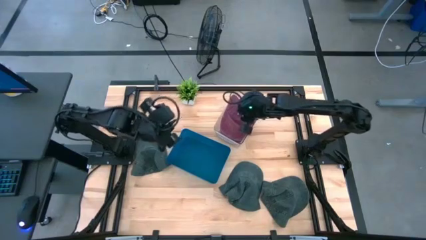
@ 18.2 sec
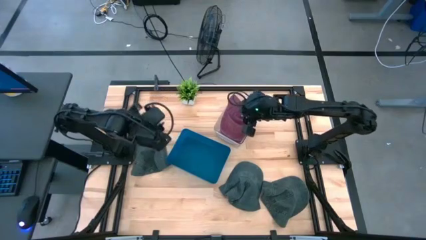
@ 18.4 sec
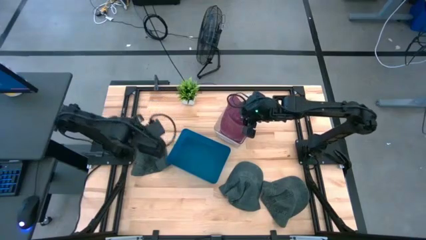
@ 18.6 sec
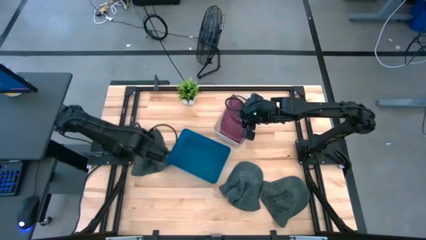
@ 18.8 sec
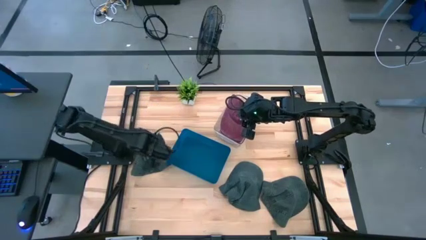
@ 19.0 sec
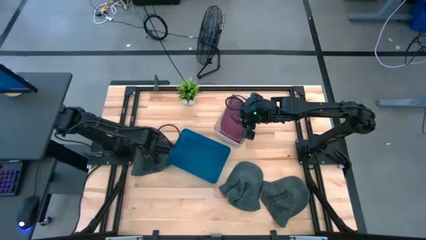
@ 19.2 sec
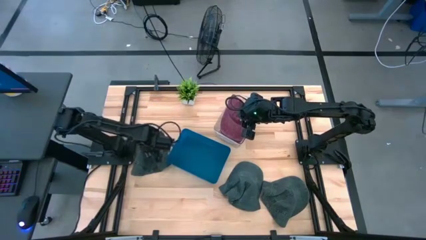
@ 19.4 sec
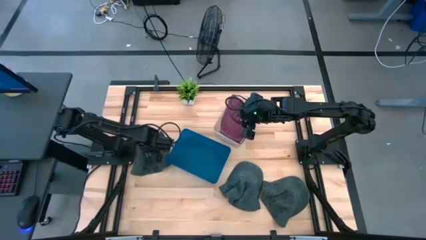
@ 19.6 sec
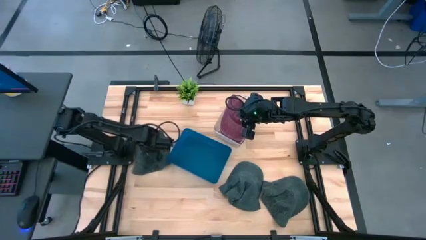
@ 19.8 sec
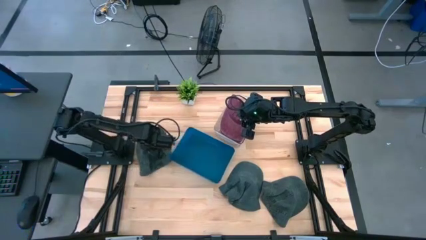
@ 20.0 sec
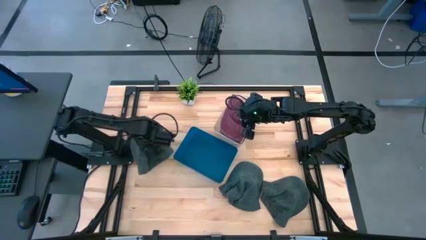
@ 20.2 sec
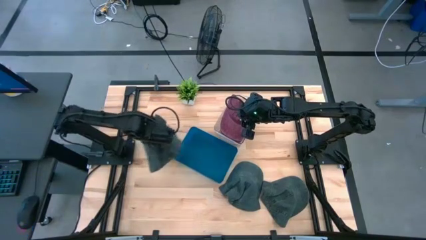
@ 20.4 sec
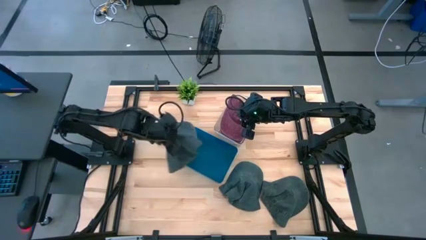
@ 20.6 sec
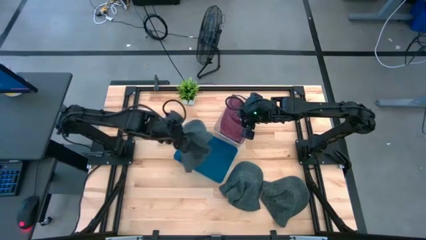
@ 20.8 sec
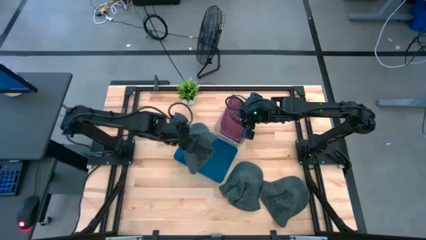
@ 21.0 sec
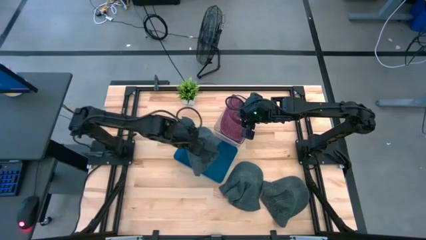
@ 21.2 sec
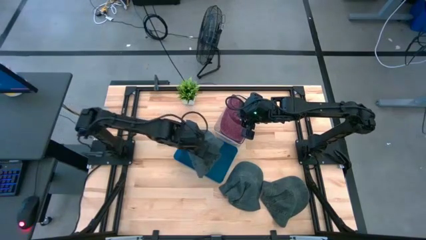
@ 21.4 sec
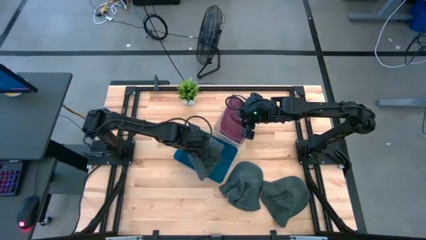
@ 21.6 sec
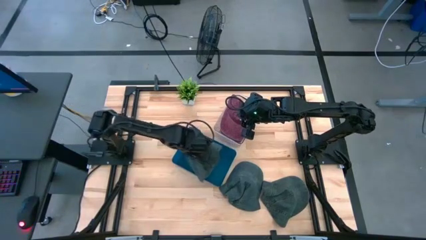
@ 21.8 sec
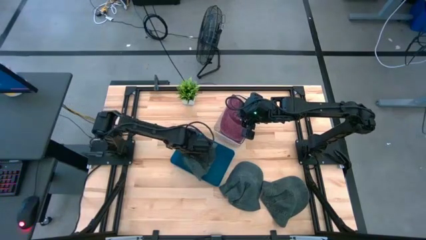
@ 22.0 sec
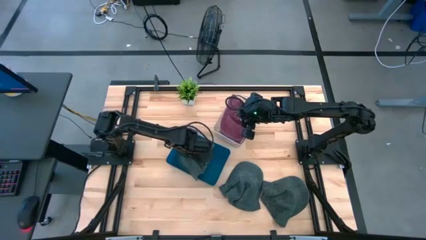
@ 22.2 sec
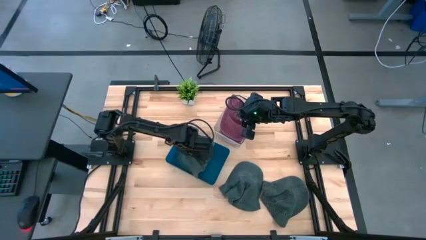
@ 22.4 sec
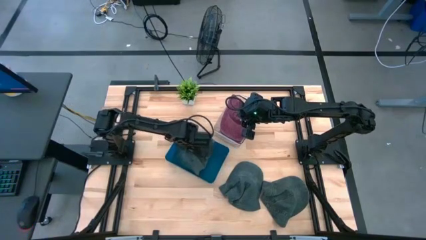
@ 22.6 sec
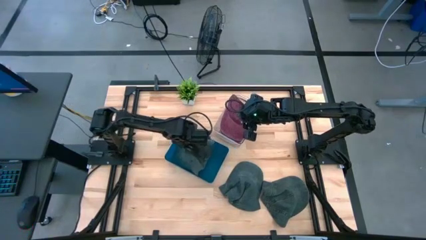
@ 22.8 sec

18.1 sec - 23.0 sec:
Task: Pick & Place hat
Put the left gray cap into the blue bin

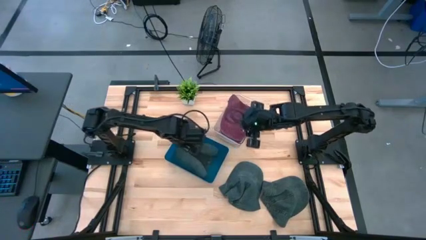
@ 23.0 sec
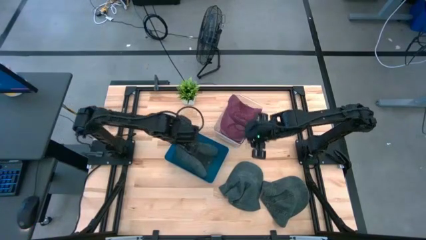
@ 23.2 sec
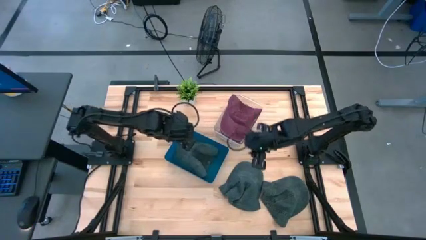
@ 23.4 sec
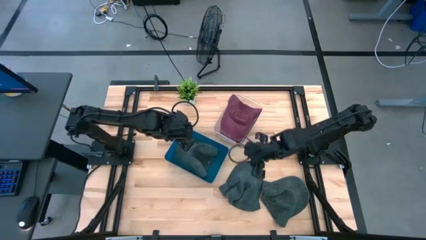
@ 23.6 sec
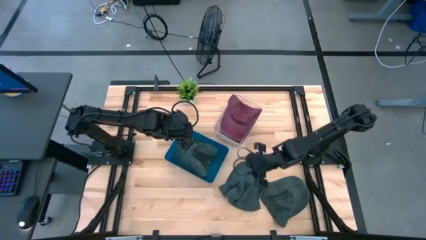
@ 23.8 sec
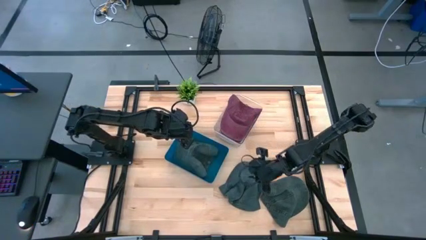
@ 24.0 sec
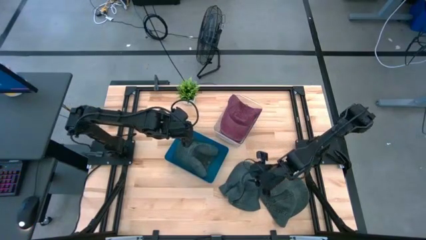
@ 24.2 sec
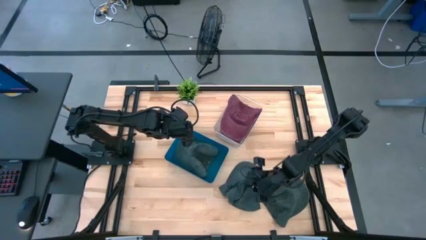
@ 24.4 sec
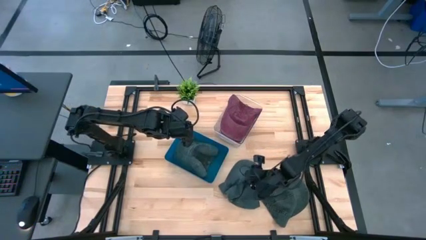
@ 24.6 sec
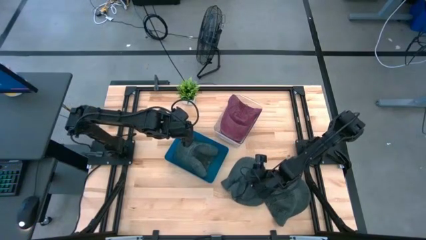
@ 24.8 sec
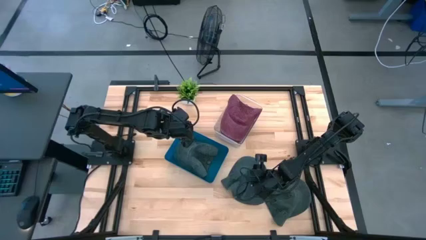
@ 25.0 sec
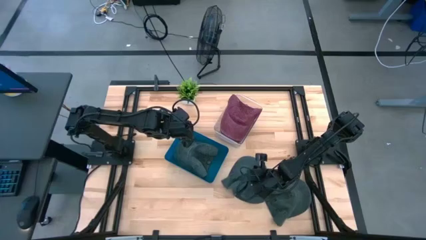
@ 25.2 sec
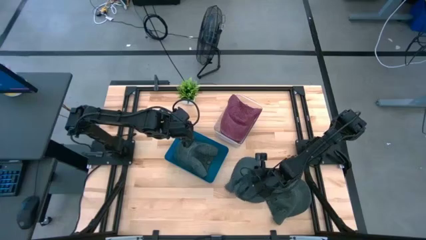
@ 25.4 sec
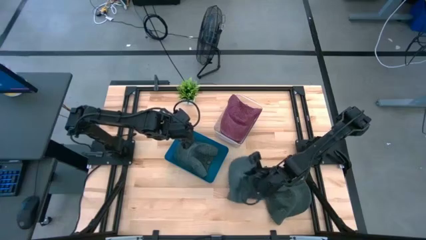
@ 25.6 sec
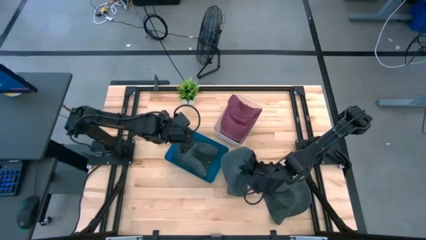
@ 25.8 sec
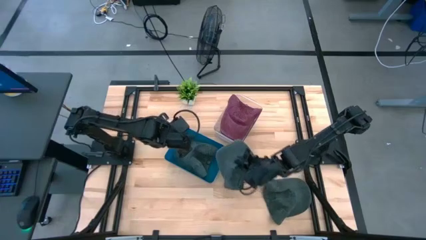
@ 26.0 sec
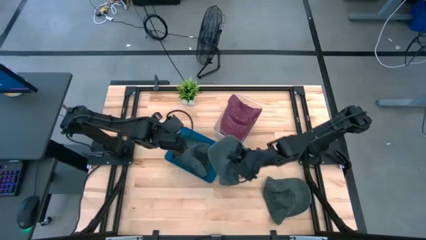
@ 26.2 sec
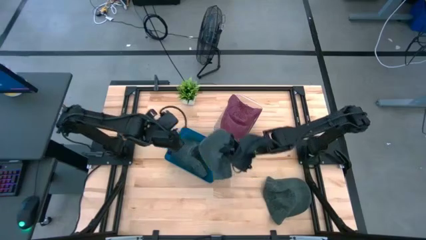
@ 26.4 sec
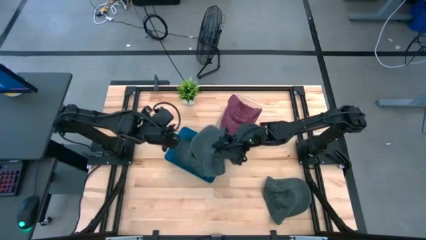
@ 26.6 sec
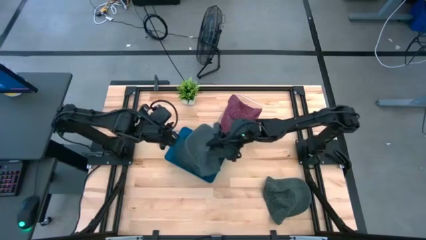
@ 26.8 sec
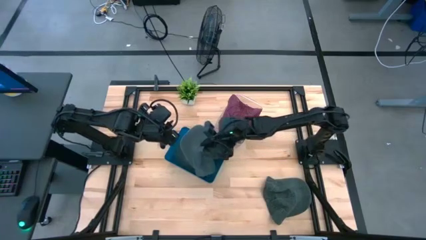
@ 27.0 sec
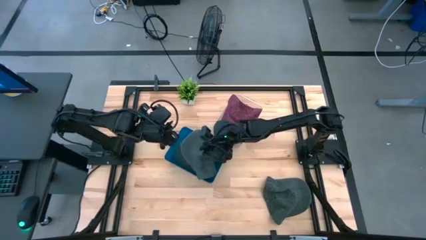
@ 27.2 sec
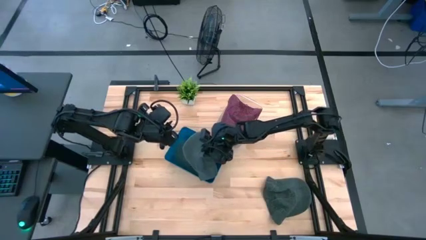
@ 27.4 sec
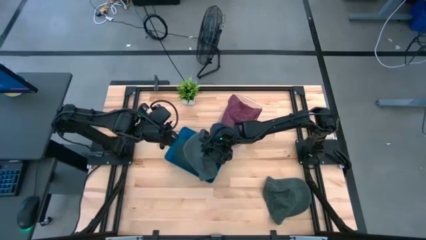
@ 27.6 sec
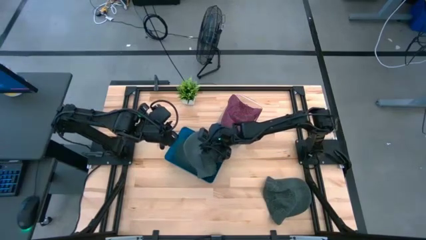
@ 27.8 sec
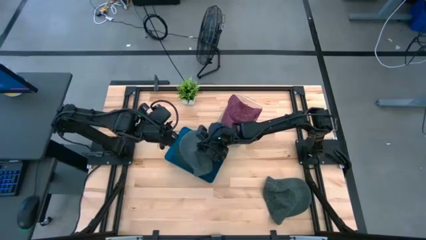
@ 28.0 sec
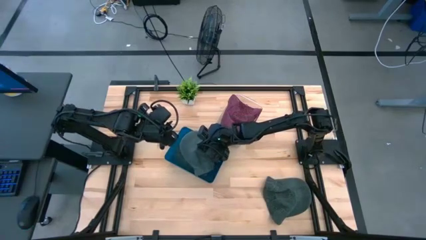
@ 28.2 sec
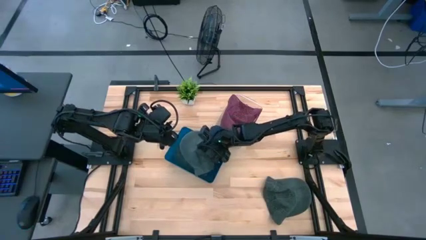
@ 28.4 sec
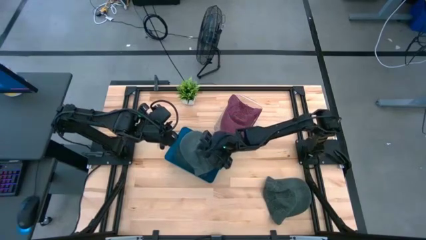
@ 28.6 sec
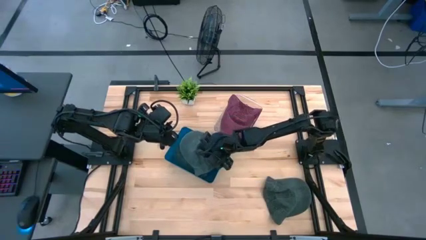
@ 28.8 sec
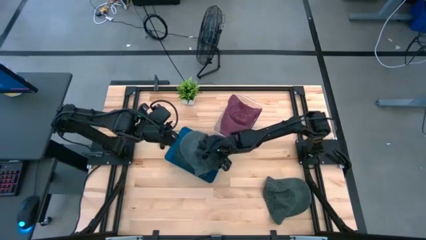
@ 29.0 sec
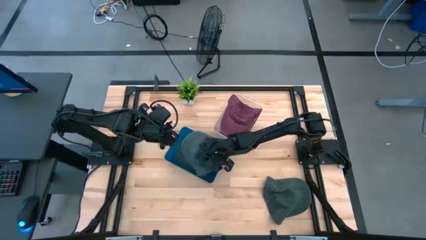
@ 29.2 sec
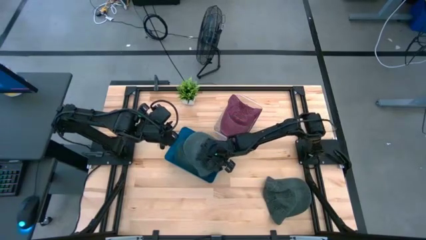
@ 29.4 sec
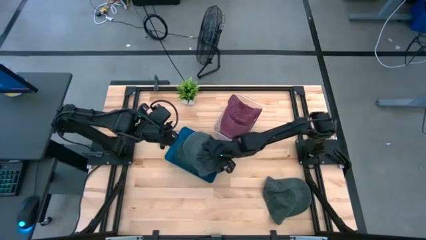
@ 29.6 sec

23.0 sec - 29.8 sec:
Put the left gray cap into the blue bin

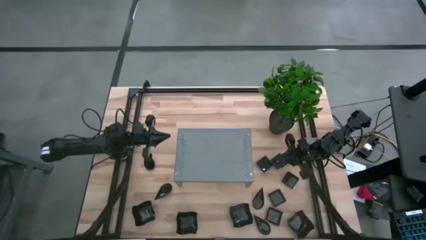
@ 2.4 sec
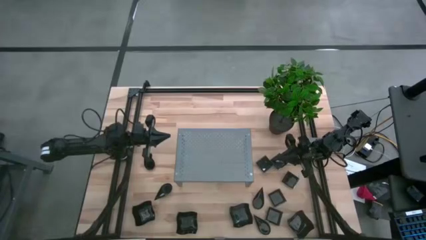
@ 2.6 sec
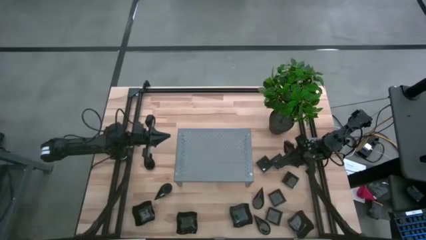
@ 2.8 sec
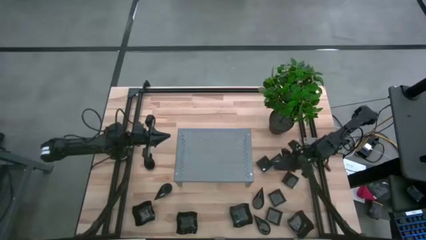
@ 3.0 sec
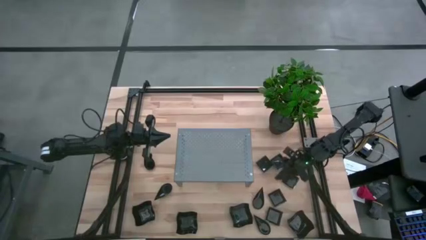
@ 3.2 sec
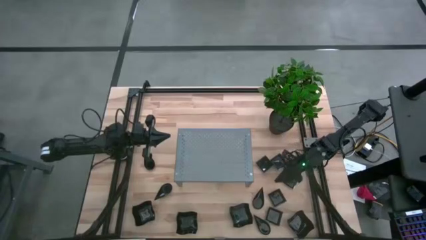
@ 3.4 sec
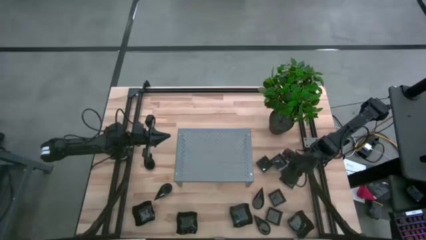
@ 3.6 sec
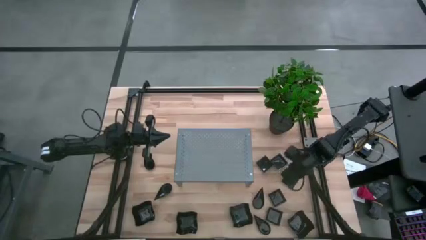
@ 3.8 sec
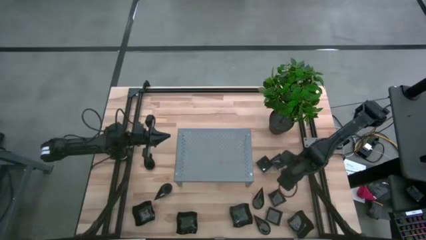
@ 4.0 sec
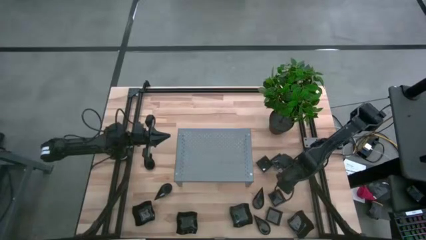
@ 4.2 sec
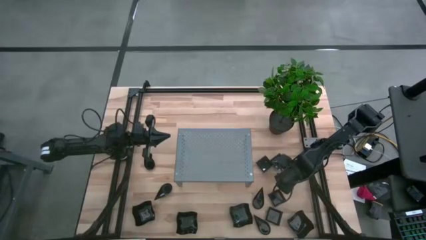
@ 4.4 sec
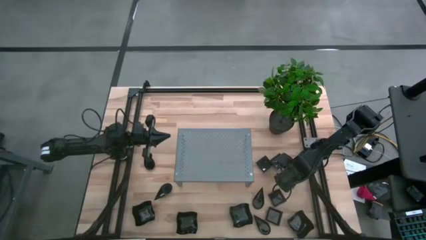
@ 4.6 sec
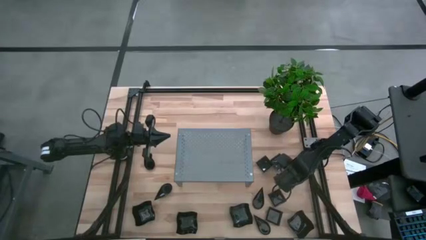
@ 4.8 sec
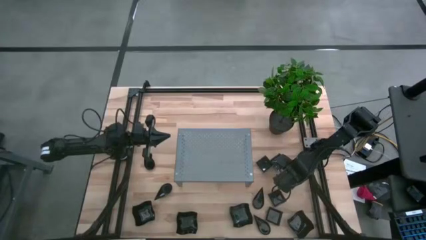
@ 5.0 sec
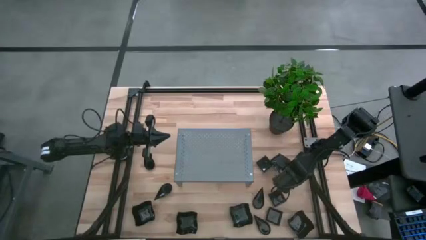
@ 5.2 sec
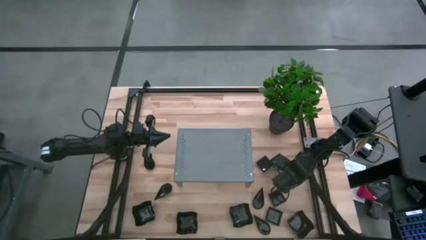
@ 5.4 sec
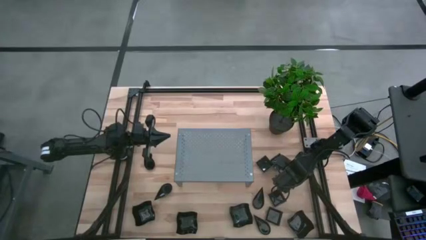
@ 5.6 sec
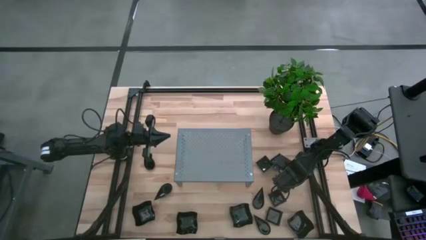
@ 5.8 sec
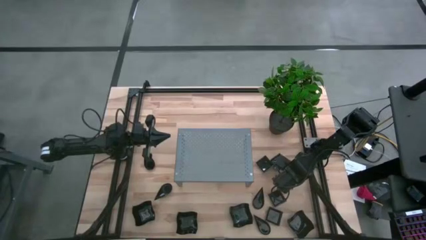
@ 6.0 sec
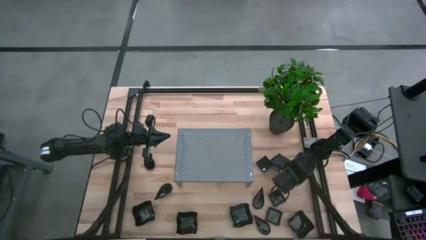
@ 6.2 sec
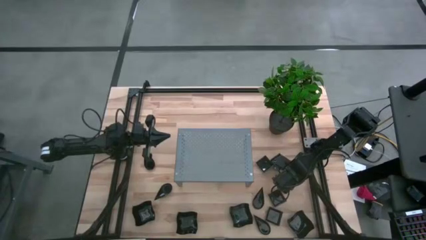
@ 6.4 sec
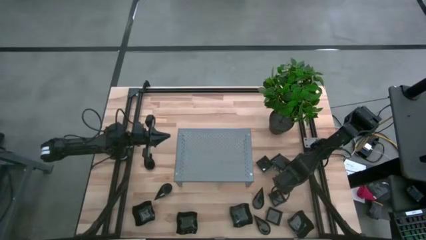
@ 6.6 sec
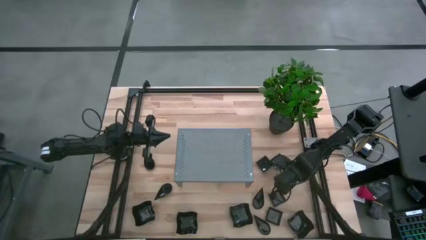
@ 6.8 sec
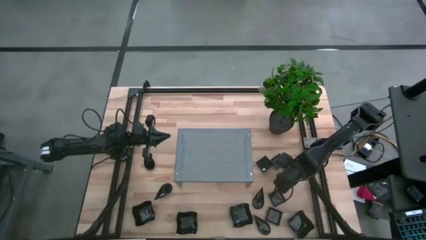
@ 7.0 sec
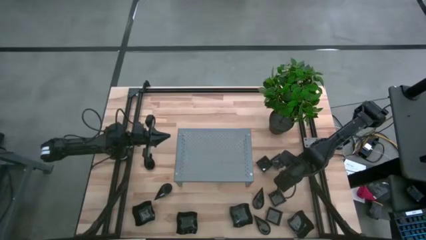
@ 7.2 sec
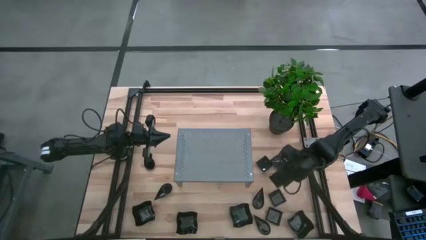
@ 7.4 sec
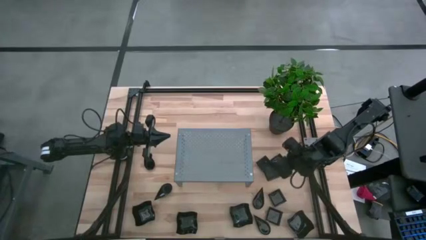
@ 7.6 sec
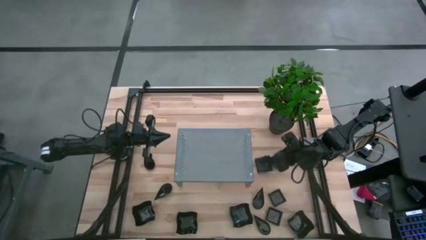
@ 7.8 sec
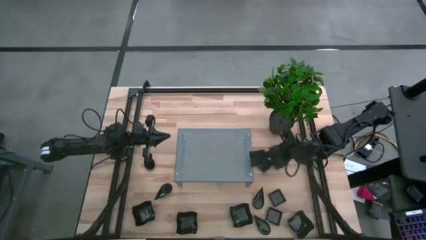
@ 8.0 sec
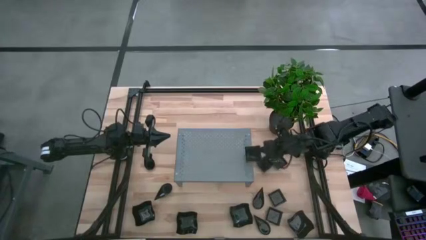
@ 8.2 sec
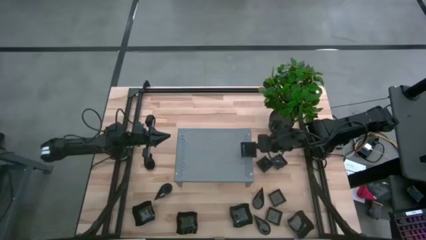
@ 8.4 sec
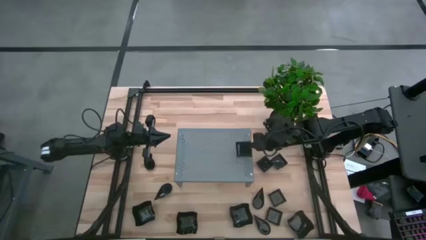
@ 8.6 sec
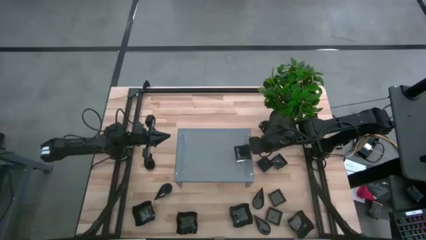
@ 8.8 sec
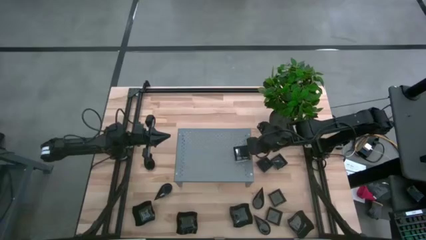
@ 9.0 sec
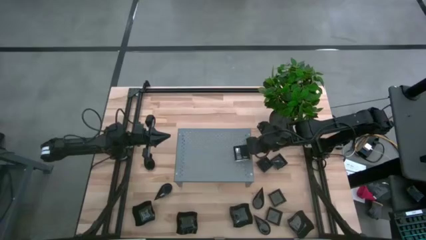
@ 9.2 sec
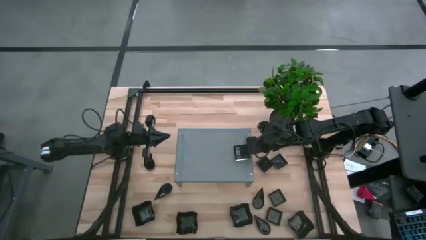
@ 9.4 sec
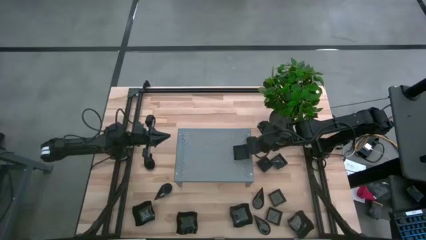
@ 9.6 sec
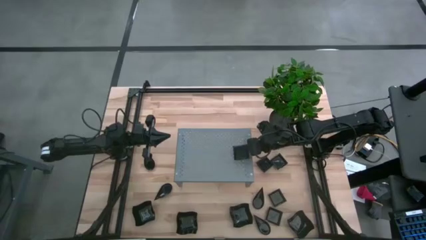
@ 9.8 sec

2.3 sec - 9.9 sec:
Task: Pick & Place Mini shaped plates
Put the black square plate on the shelf
